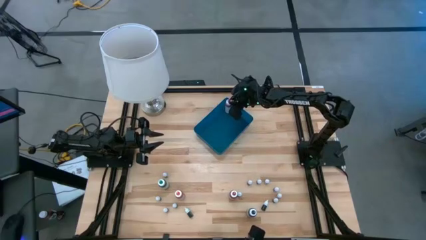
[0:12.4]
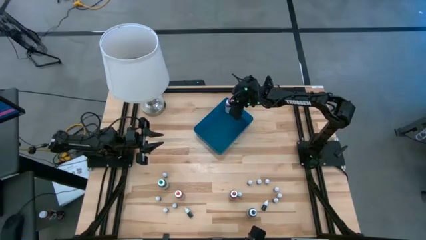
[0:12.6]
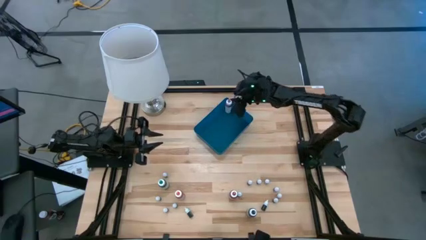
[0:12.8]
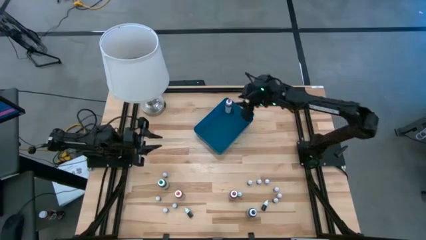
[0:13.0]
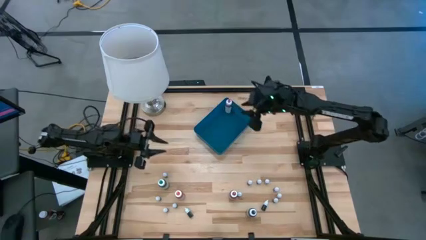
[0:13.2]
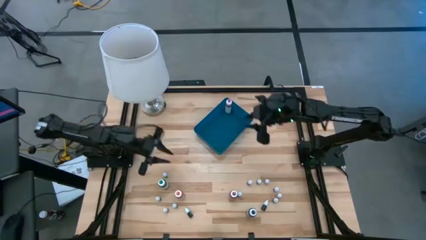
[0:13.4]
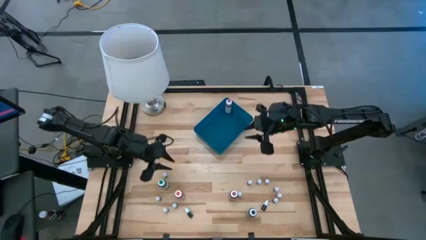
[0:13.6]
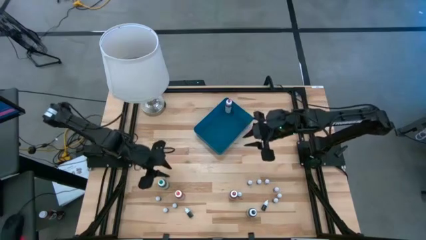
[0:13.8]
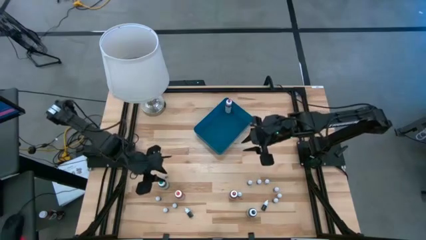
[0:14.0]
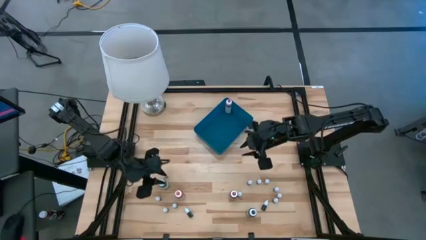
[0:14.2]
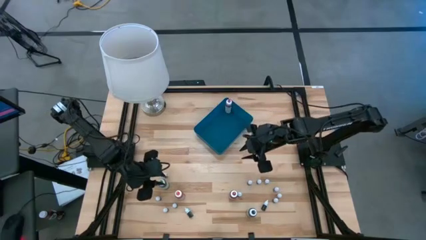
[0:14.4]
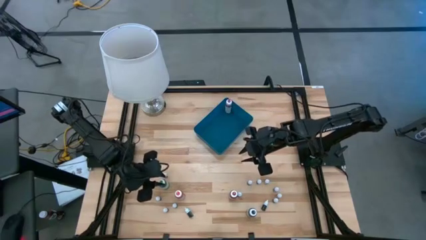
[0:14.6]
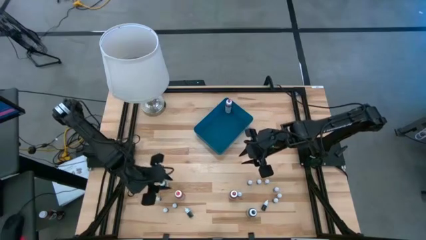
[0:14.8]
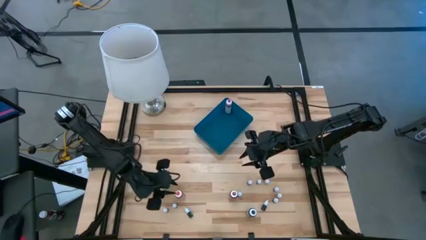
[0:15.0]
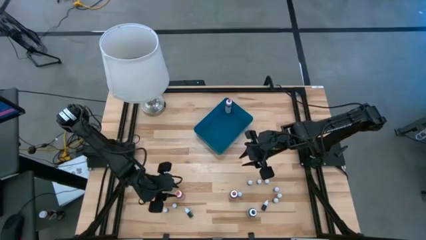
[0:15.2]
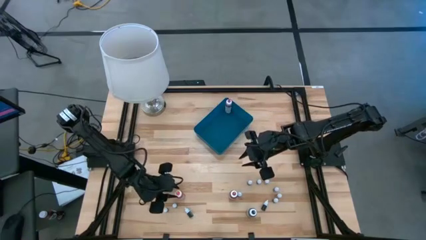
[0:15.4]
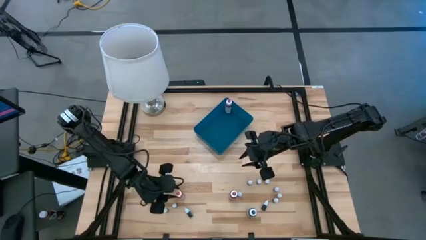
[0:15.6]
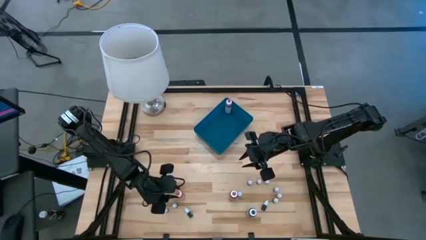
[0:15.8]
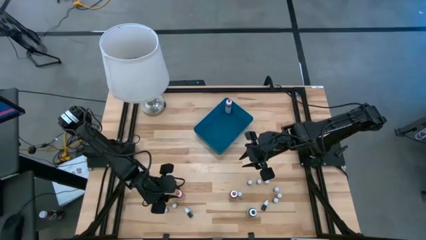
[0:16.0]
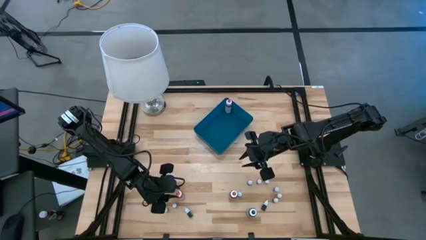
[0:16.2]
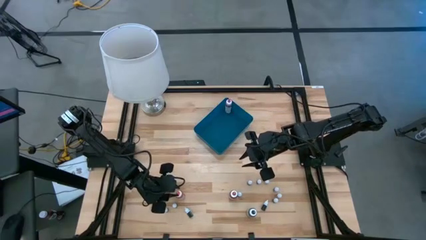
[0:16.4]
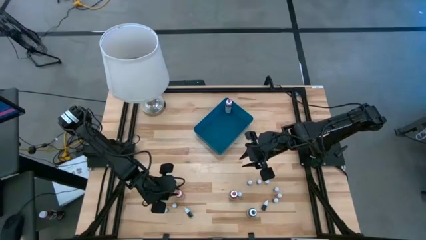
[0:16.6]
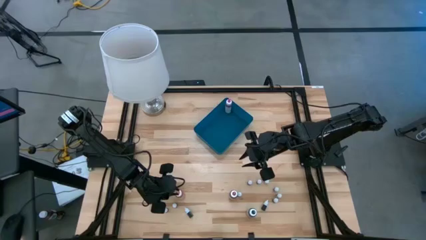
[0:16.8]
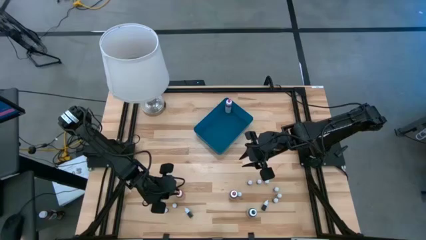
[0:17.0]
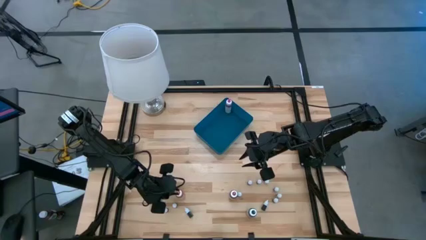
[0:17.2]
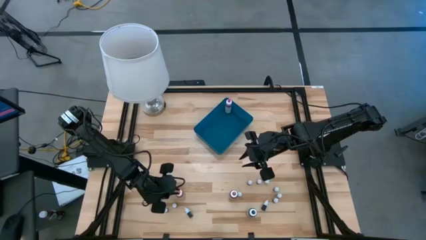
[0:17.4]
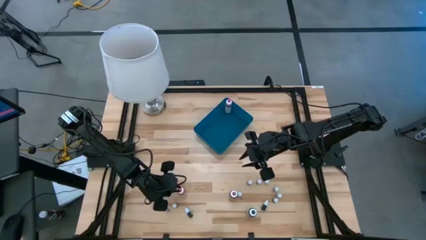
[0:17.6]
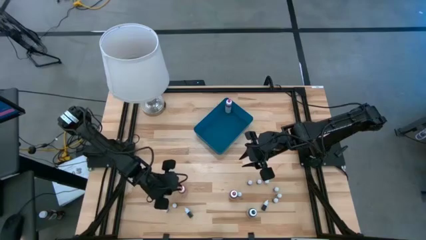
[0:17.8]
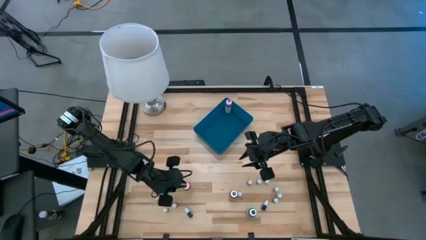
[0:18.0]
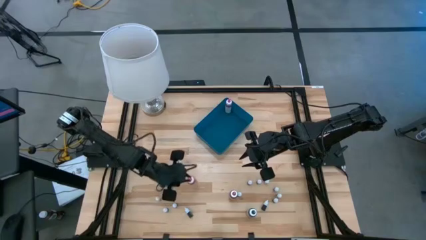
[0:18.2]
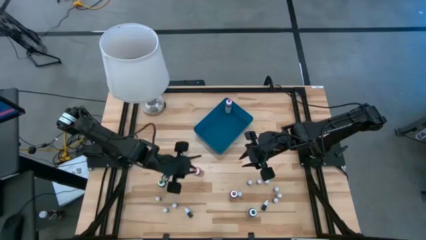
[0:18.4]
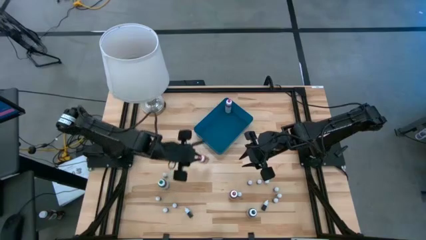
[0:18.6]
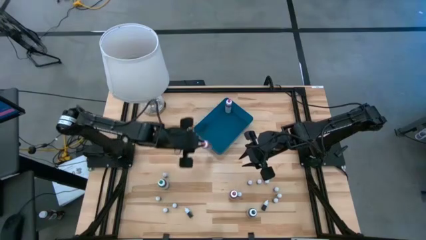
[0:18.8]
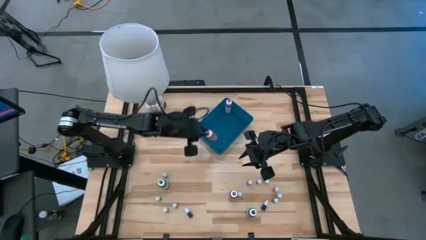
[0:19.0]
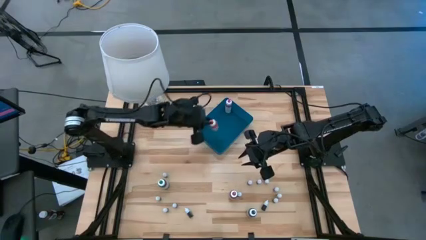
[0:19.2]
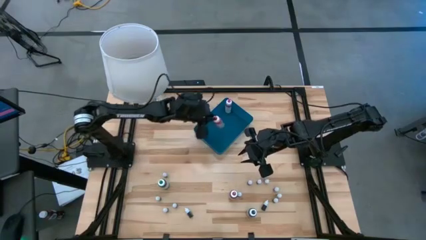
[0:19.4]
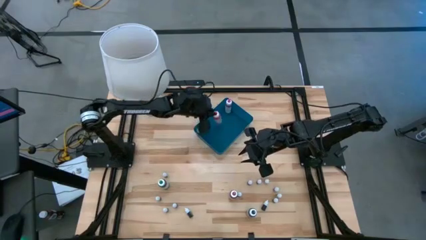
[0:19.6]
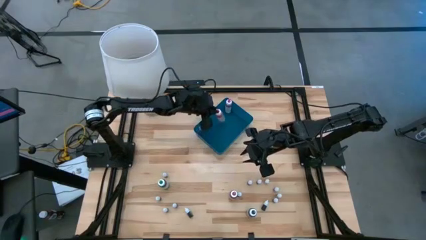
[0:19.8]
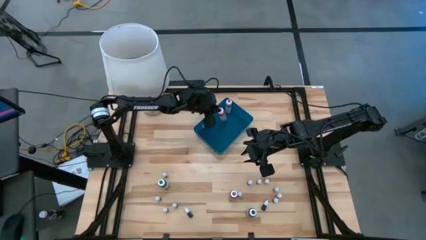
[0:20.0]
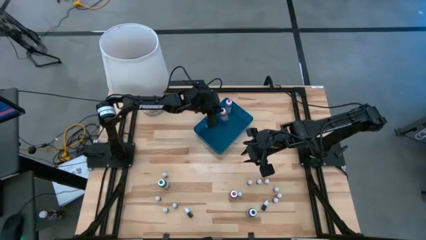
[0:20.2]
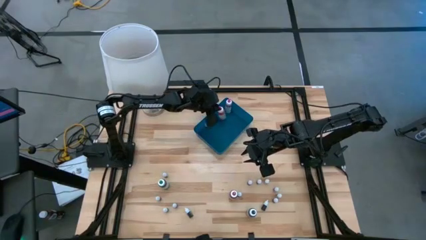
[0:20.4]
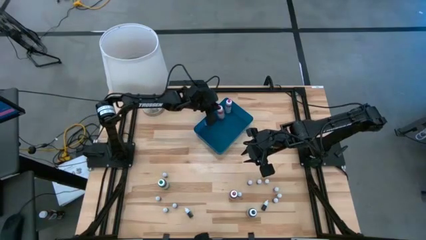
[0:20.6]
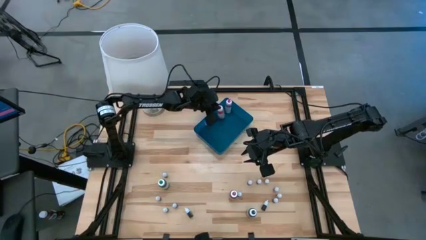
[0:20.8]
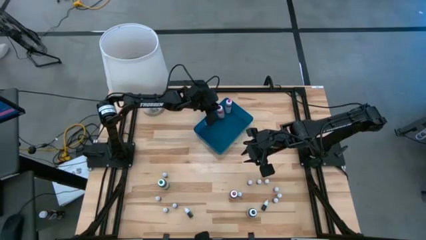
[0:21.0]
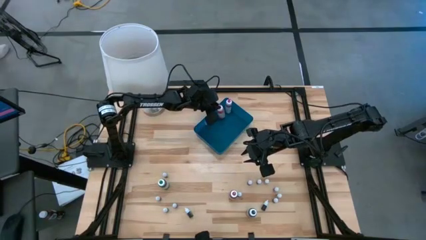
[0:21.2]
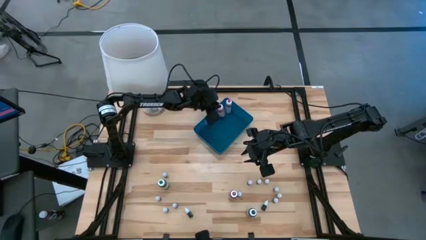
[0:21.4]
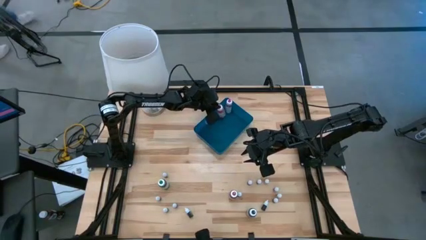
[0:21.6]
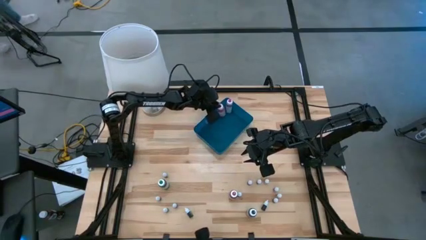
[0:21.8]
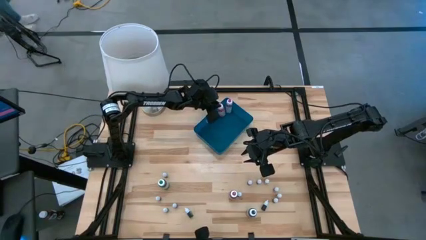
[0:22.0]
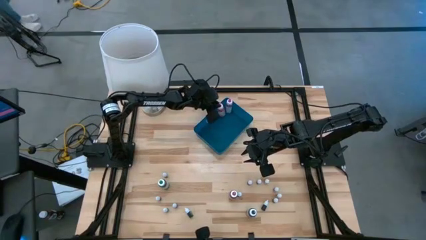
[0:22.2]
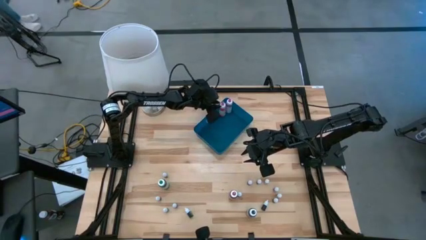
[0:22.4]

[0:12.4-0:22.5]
Task: Pick & Place food coloring
Put the large orange food coloring bottle into the blue container

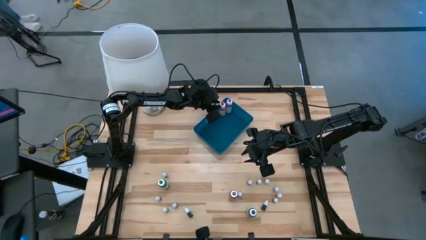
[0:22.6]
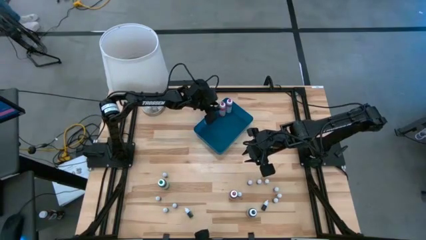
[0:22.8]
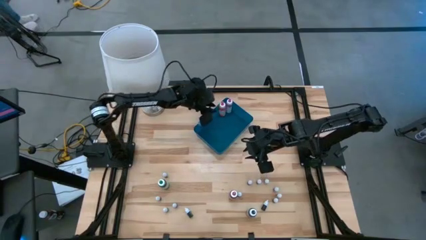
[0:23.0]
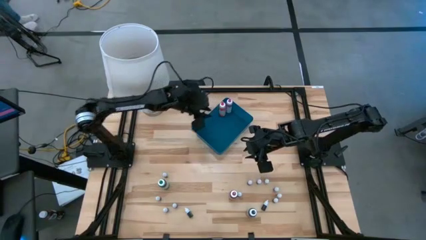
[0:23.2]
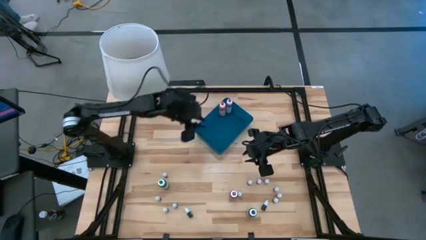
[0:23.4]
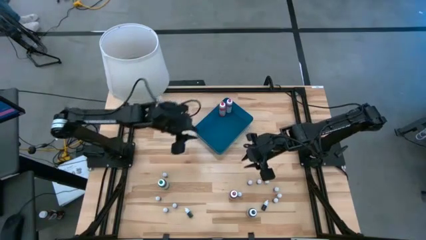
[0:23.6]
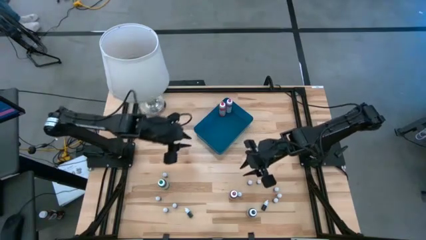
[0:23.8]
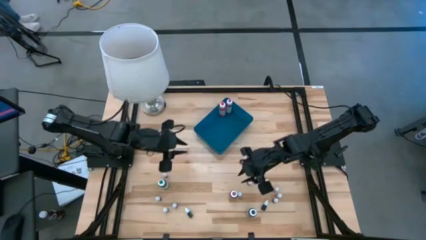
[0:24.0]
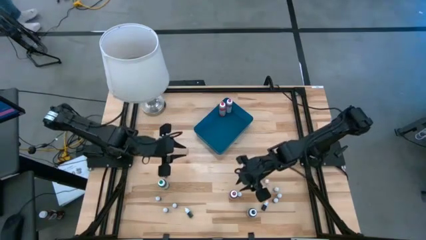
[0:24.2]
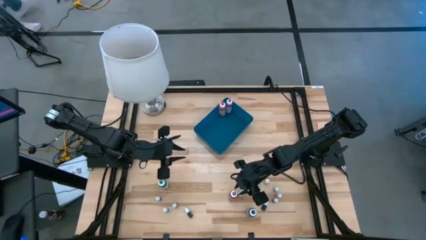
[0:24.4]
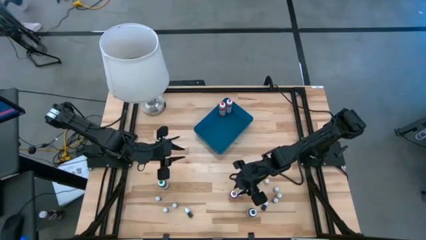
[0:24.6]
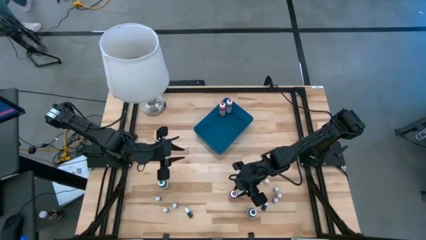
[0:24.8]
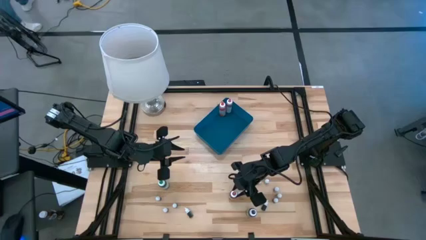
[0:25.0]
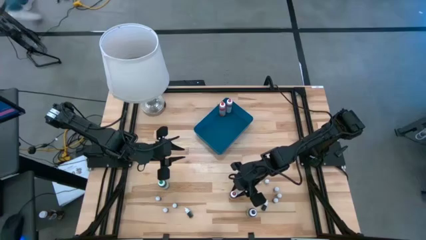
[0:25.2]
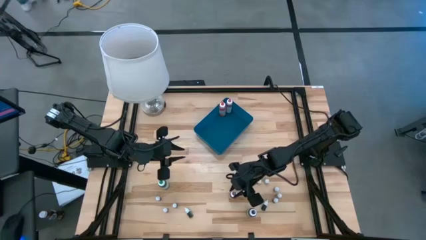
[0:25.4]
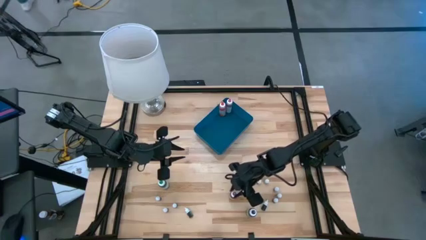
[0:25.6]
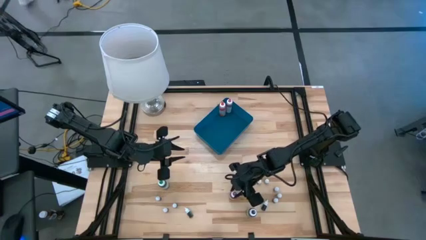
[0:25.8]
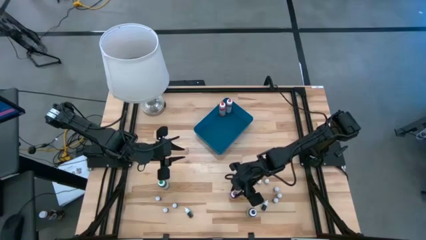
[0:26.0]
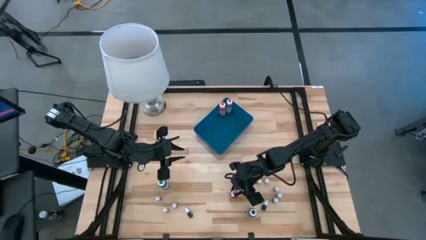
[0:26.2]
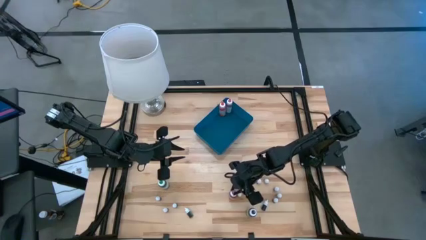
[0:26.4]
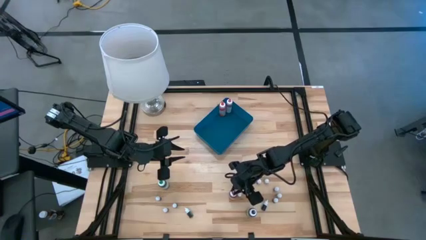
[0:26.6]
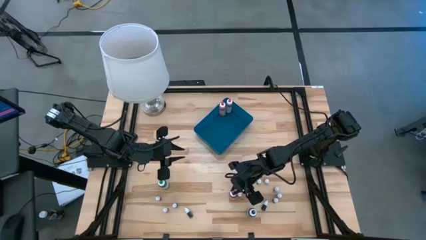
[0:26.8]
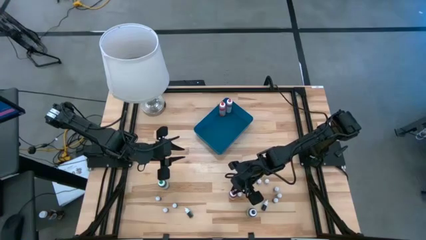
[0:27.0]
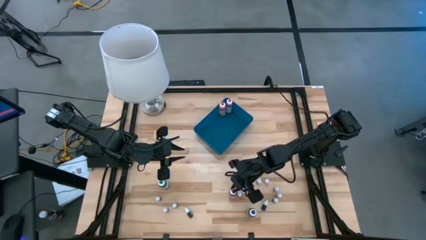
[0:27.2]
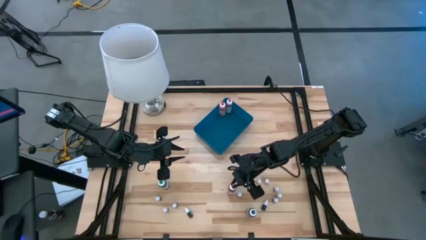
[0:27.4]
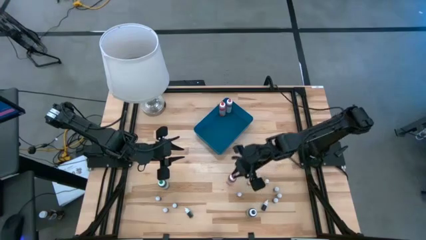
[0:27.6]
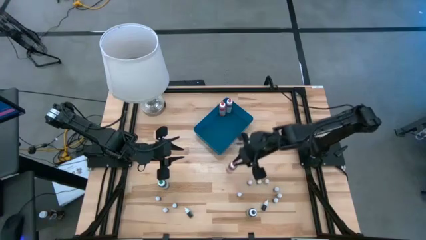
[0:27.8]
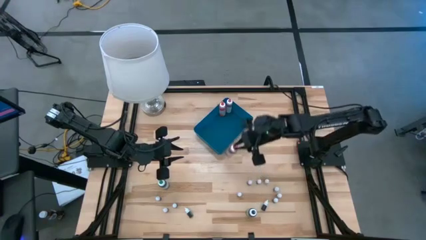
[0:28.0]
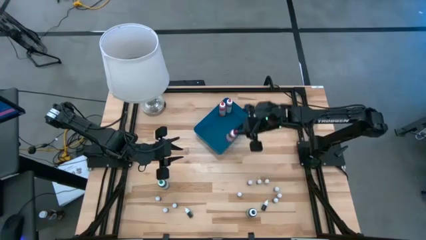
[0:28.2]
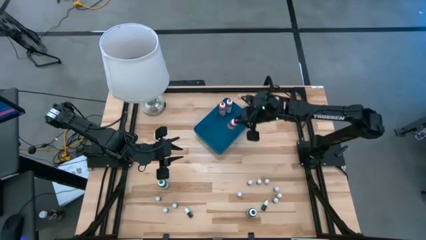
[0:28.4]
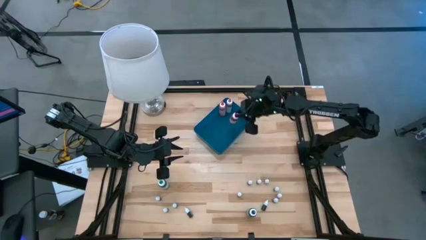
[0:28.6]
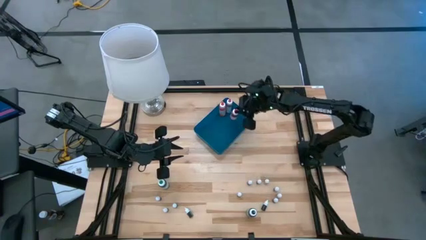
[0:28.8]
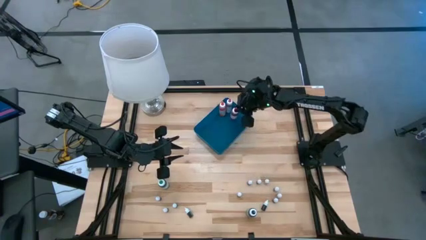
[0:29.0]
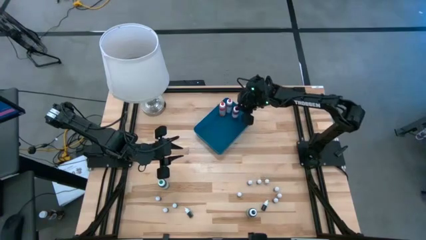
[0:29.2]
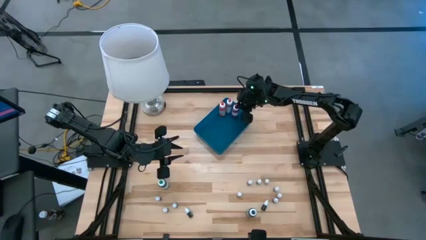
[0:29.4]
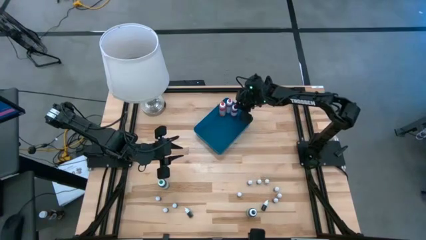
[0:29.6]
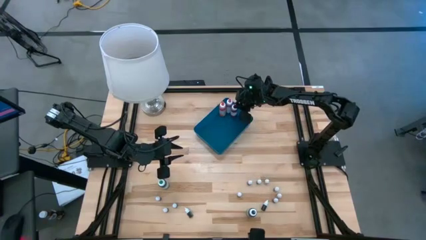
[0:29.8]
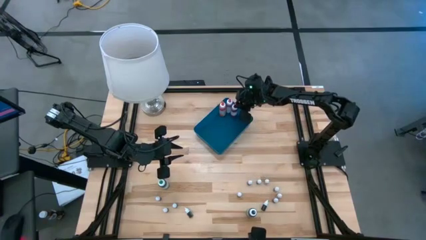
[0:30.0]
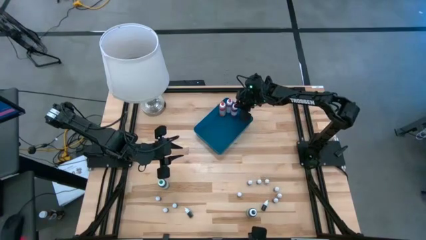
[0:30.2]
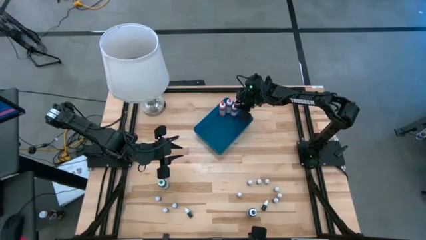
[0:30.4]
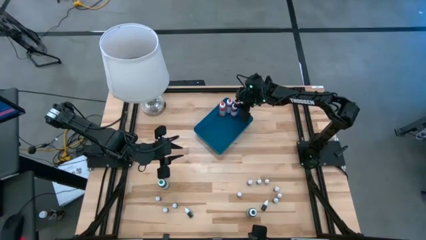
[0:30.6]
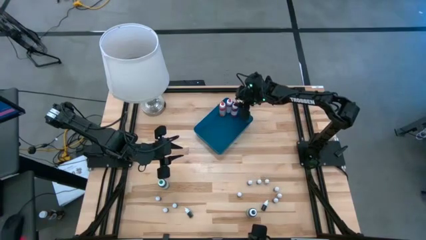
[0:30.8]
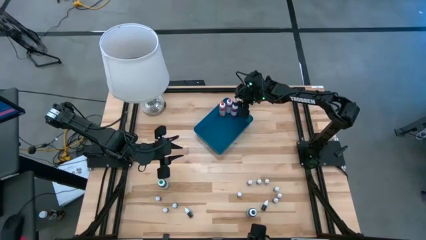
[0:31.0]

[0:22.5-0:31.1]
Put the large red food coloring bottle into the blue container
